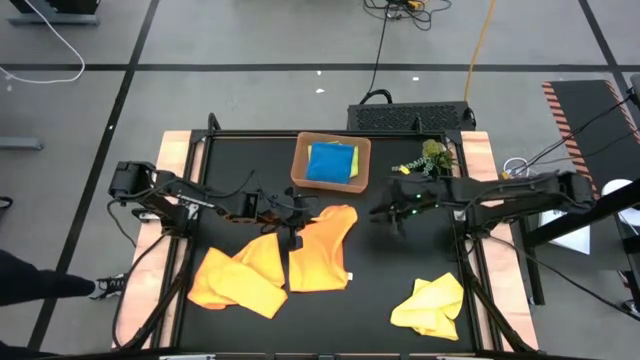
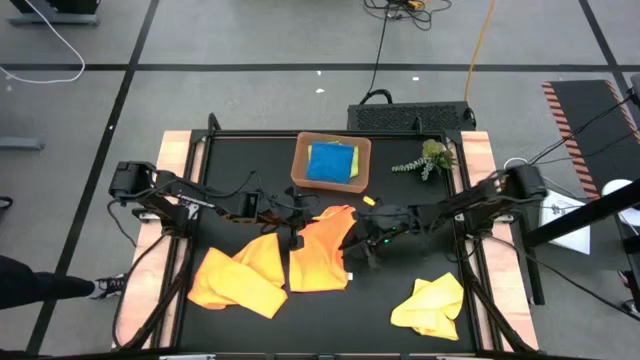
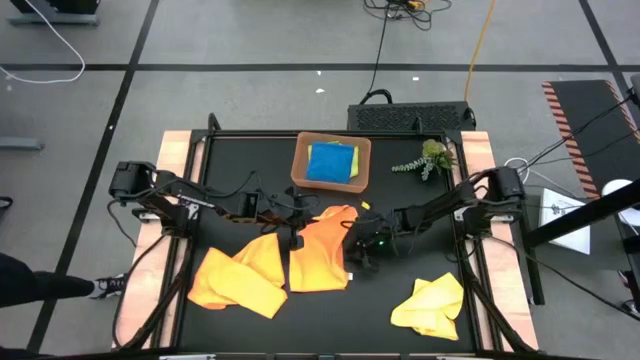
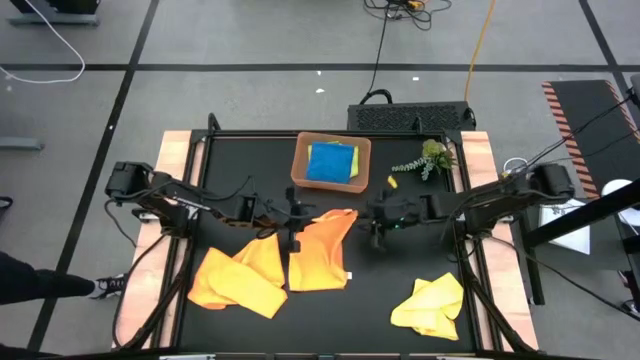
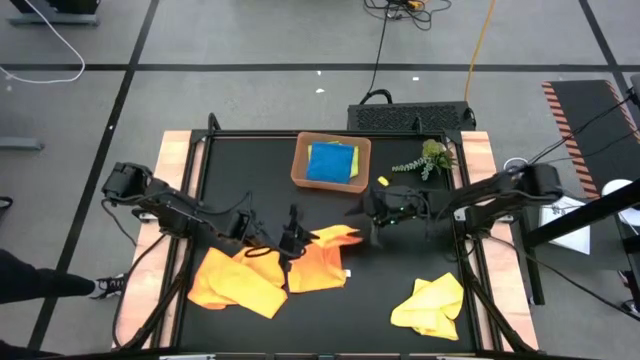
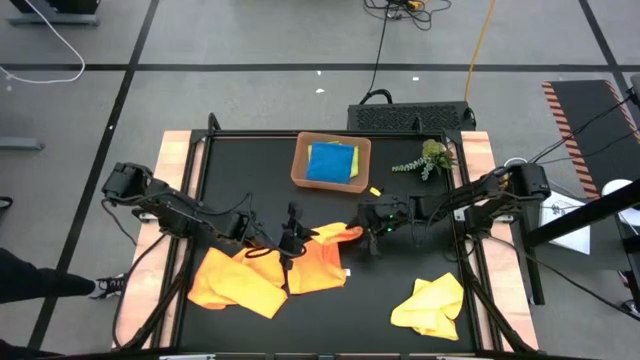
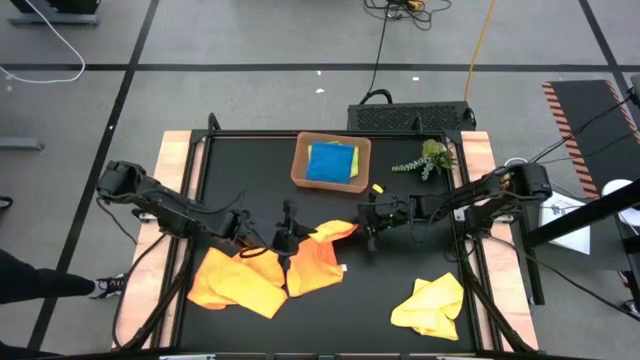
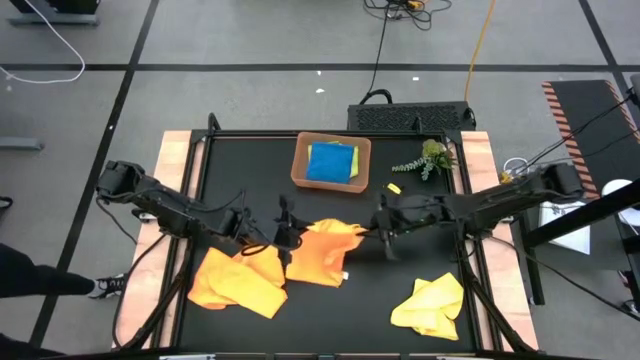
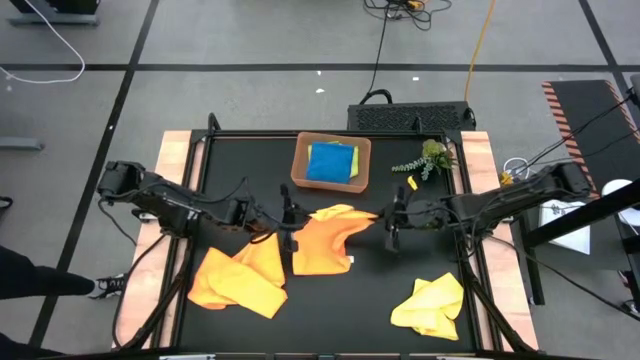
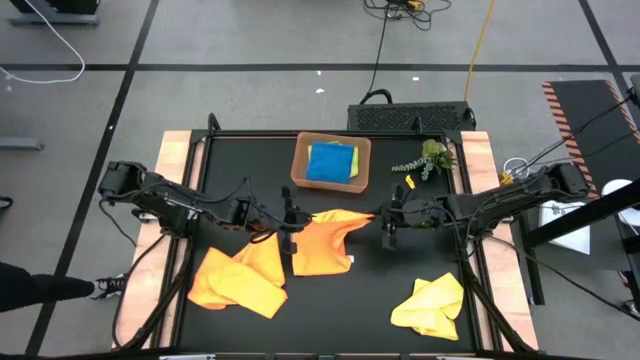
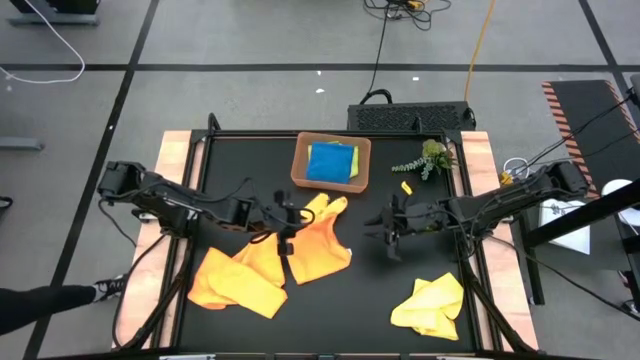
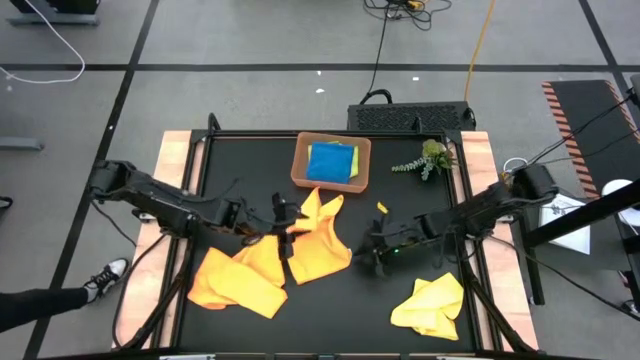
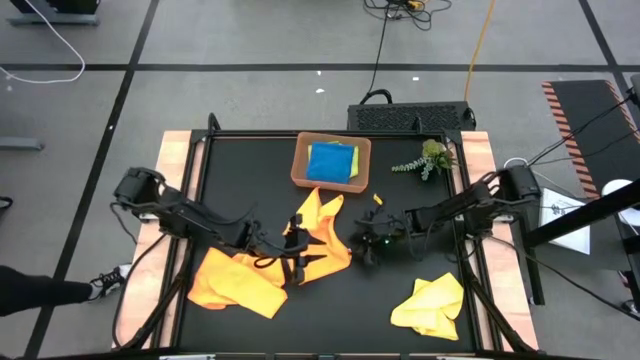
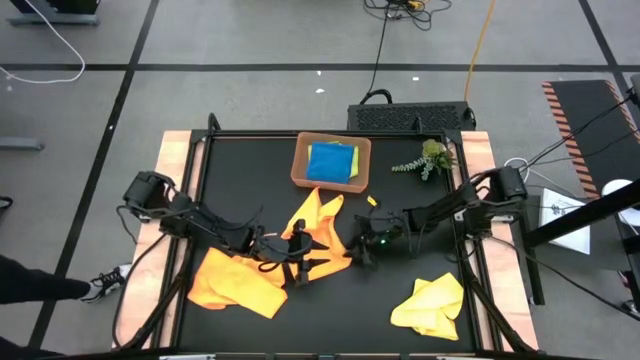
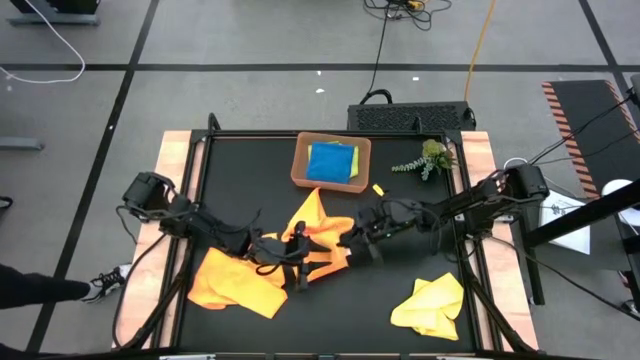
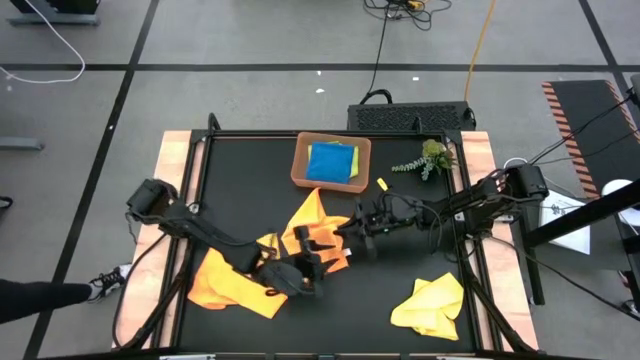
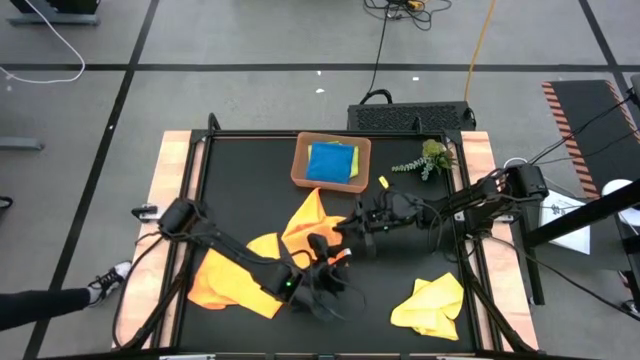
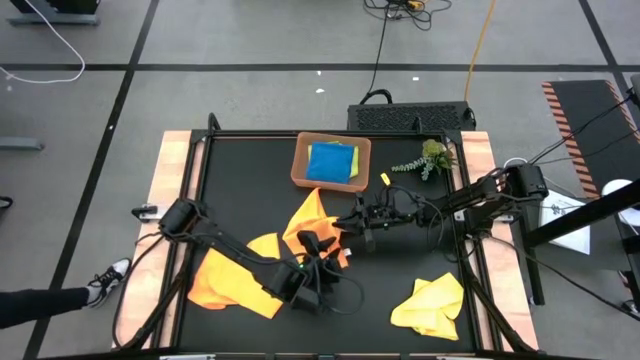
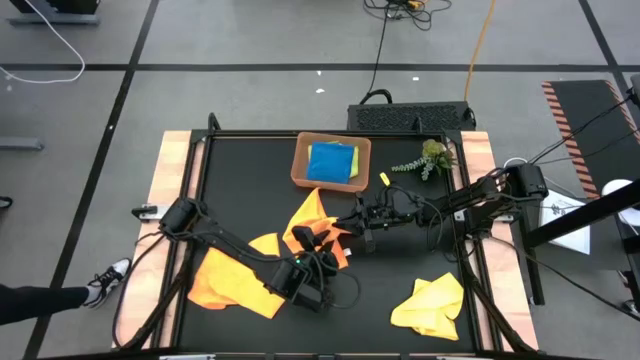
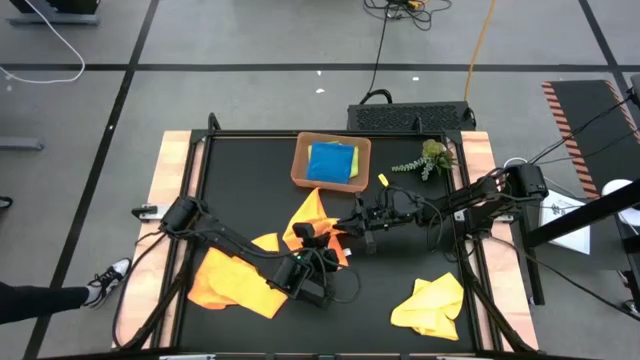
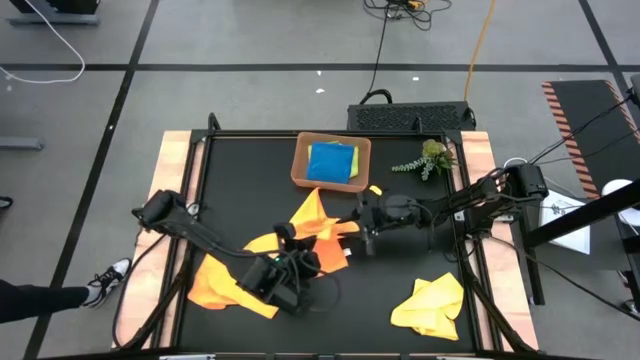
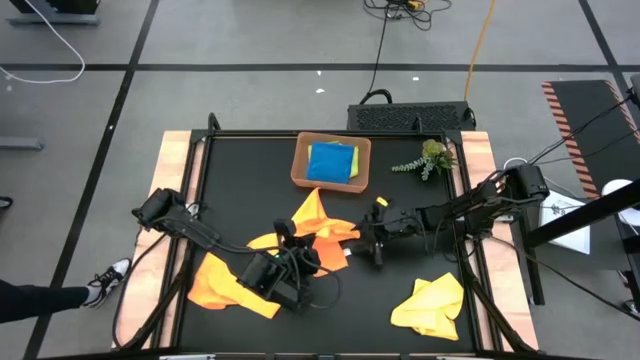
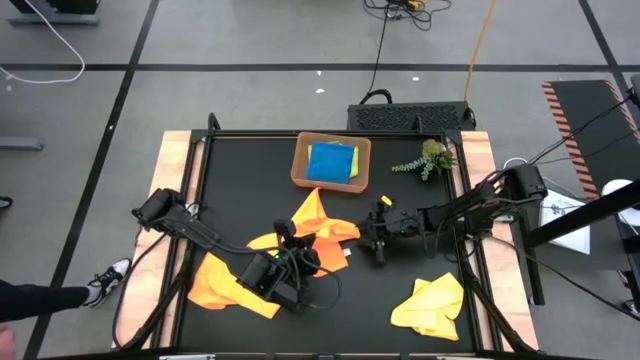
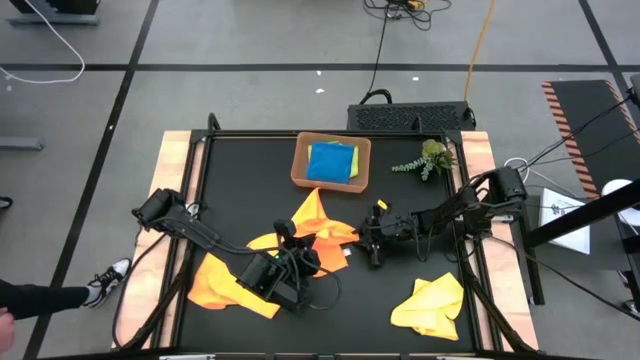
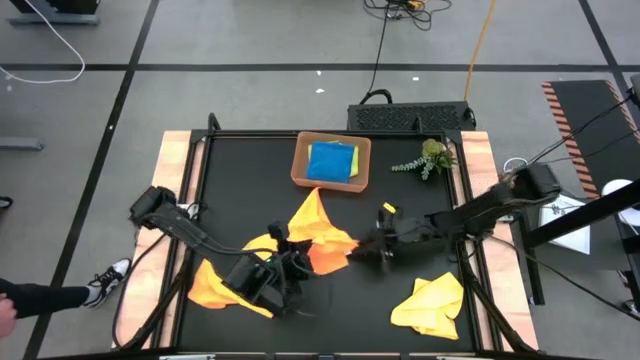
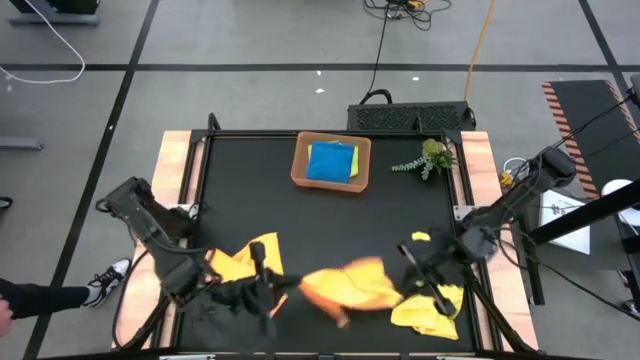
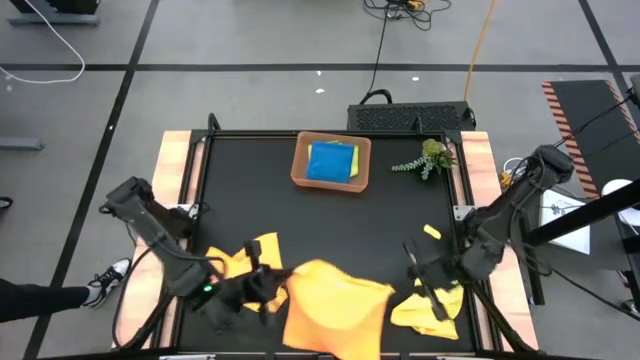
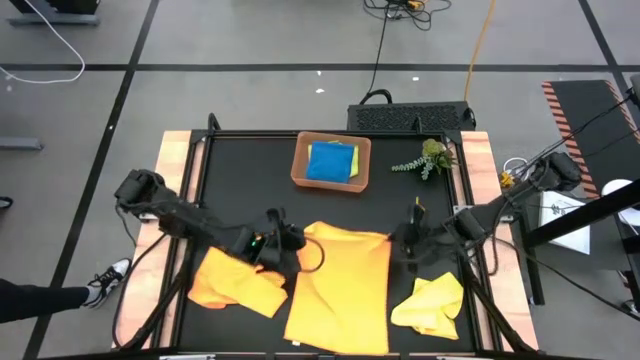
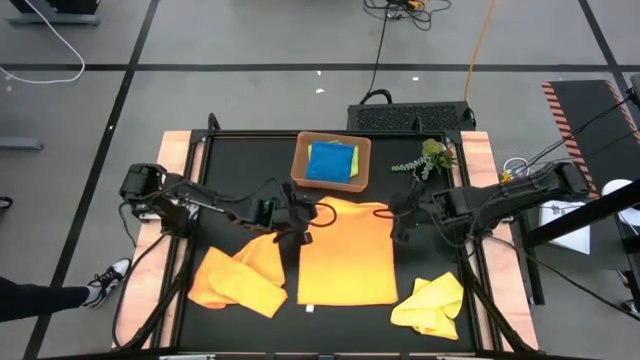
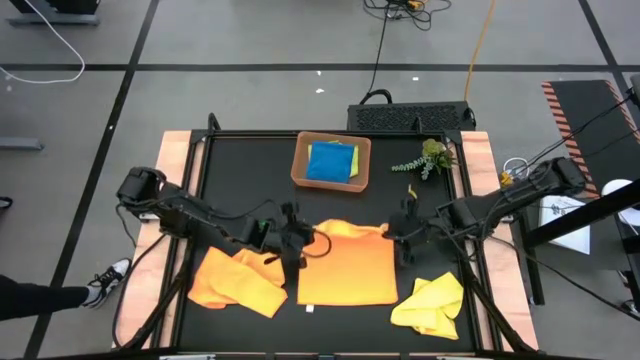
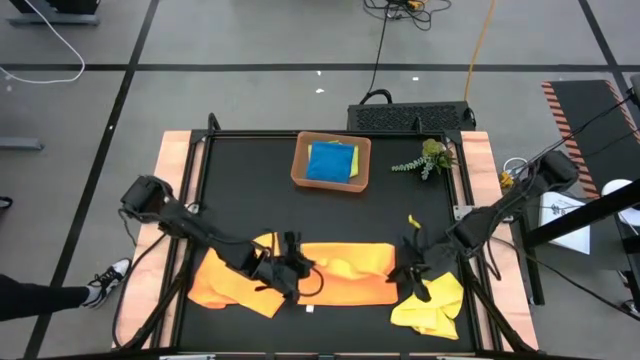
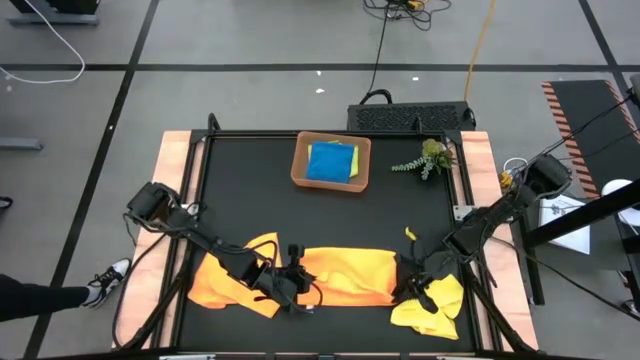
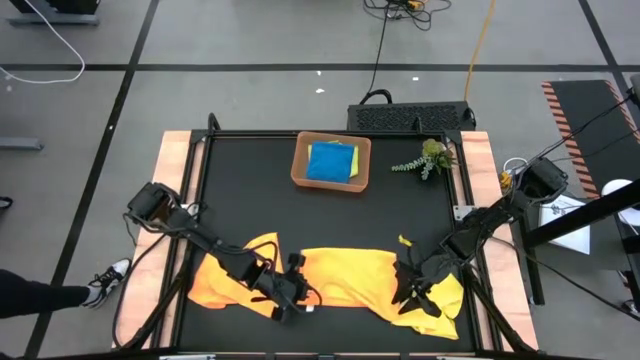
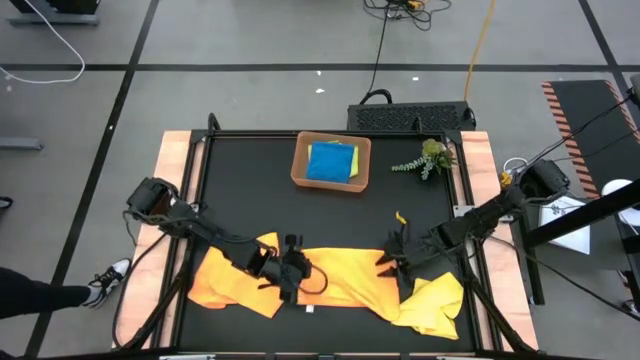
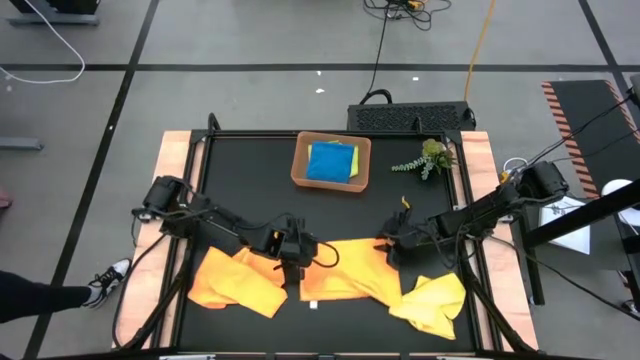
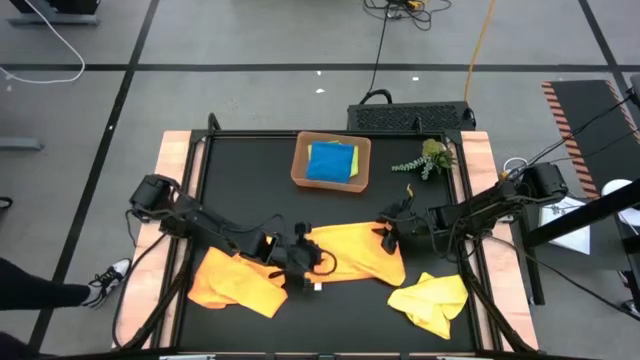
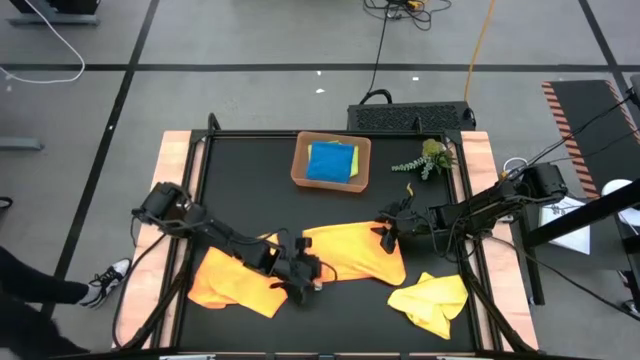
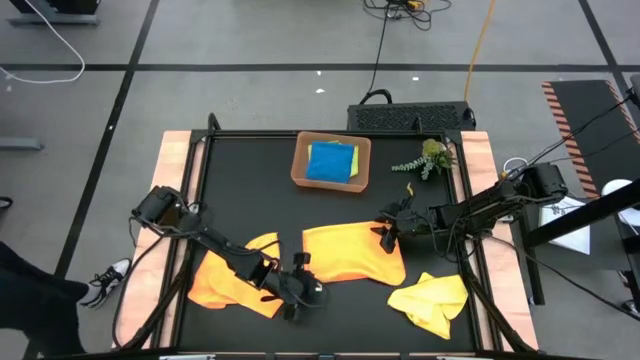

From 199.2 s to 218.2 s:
Task: Fold microfiber towels
Fold the orange microfiber towel
